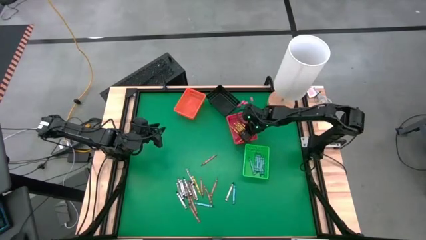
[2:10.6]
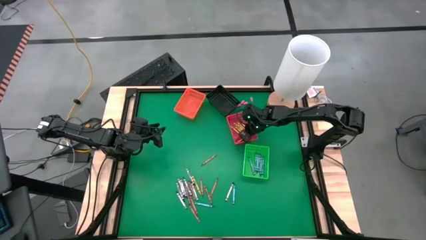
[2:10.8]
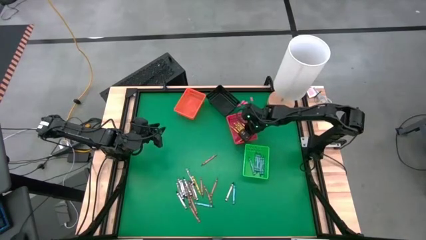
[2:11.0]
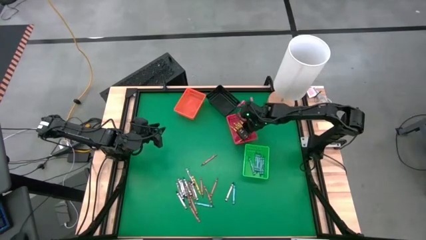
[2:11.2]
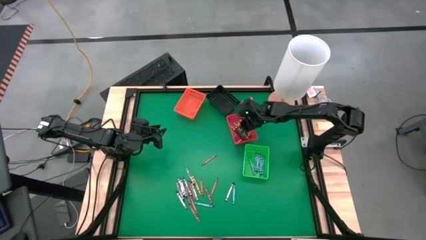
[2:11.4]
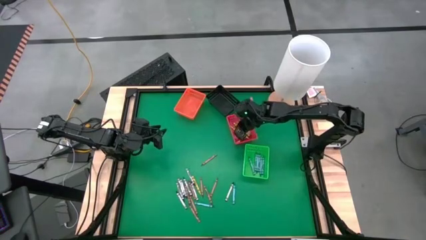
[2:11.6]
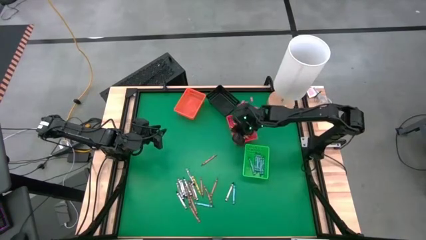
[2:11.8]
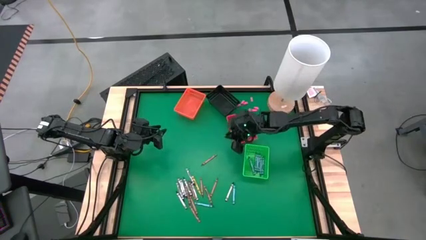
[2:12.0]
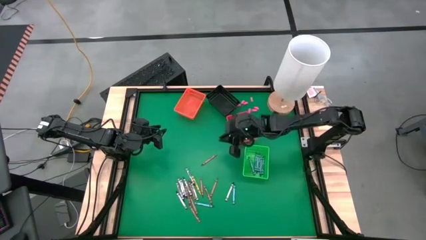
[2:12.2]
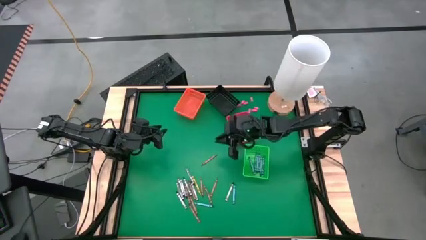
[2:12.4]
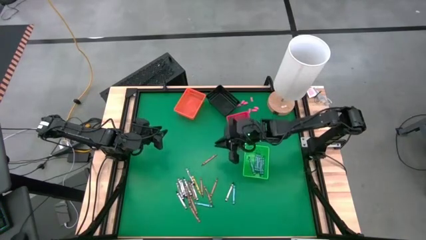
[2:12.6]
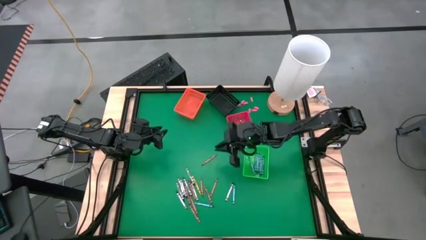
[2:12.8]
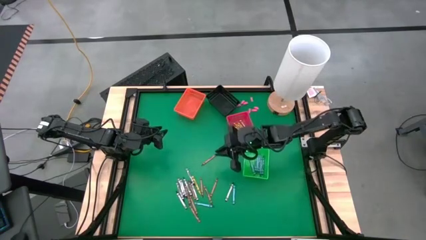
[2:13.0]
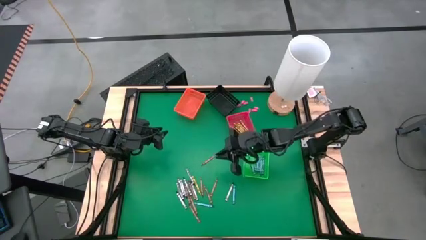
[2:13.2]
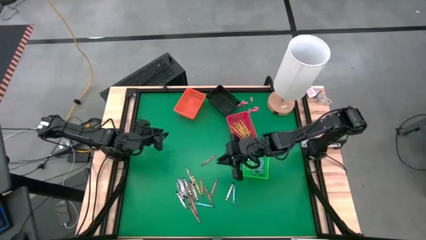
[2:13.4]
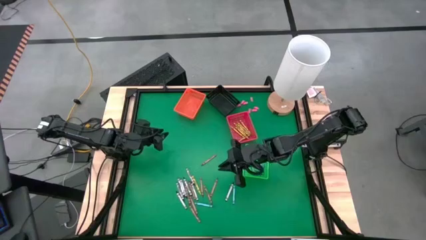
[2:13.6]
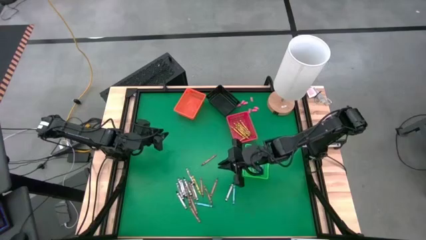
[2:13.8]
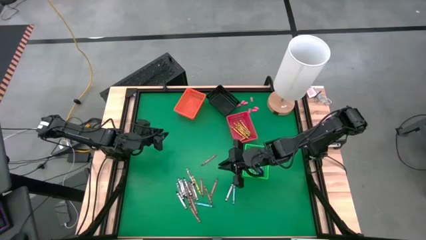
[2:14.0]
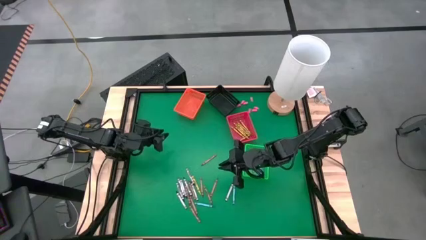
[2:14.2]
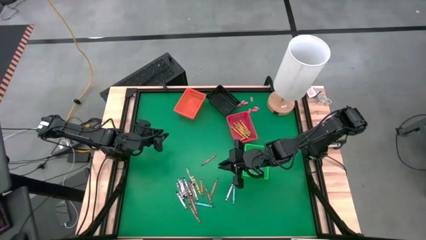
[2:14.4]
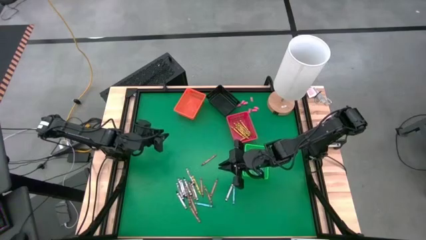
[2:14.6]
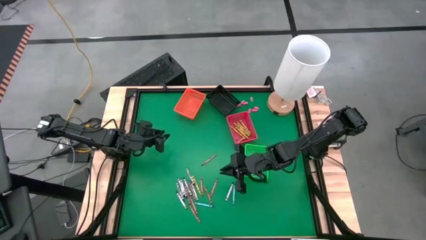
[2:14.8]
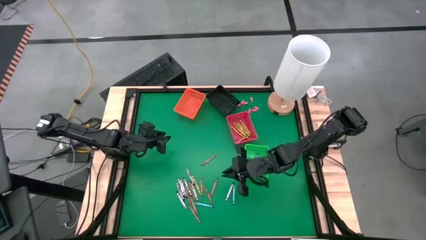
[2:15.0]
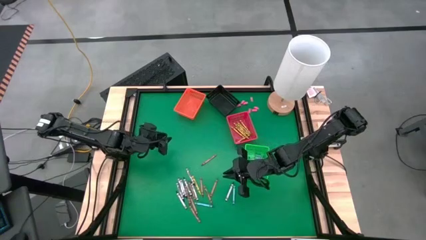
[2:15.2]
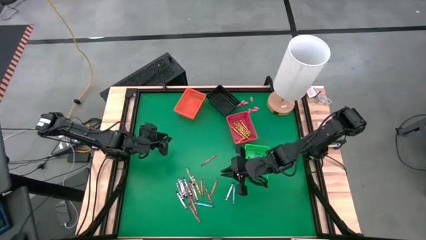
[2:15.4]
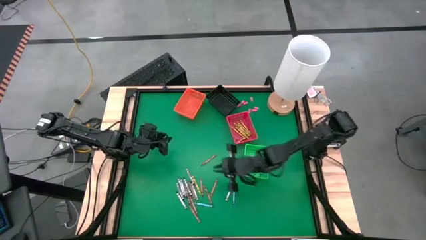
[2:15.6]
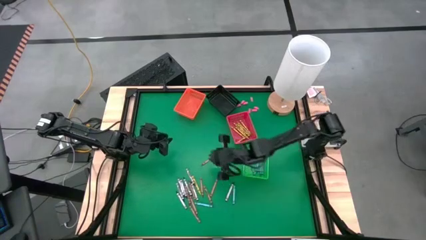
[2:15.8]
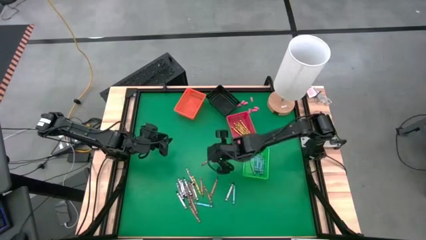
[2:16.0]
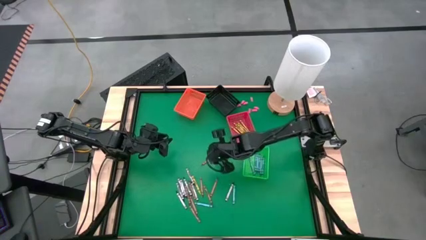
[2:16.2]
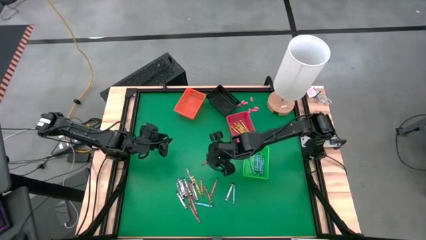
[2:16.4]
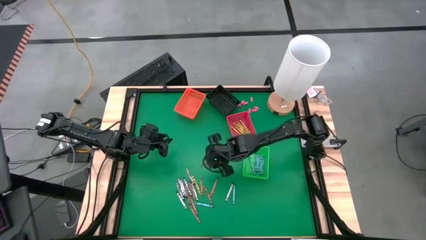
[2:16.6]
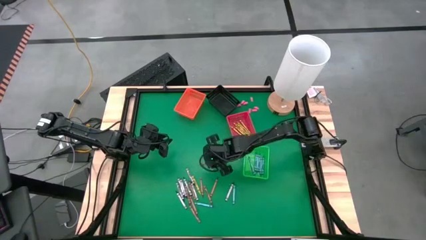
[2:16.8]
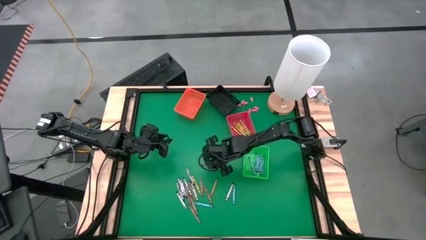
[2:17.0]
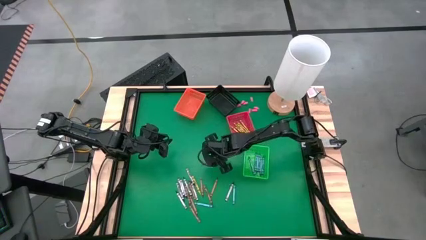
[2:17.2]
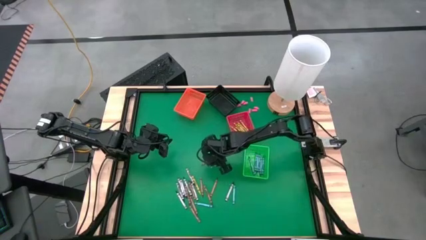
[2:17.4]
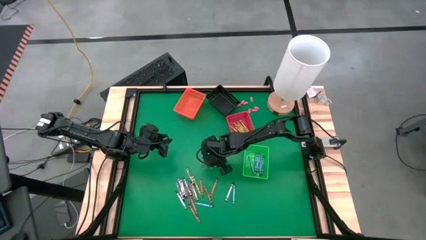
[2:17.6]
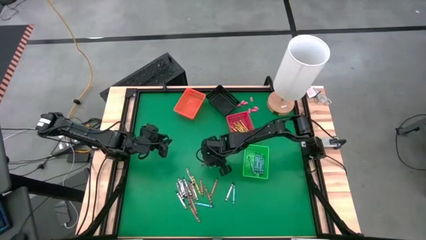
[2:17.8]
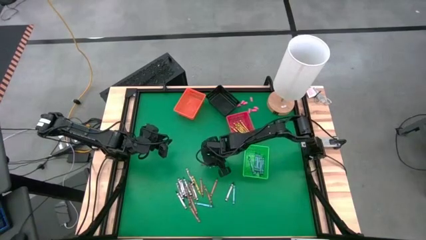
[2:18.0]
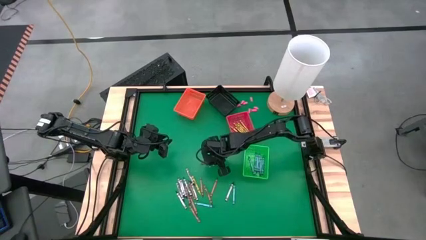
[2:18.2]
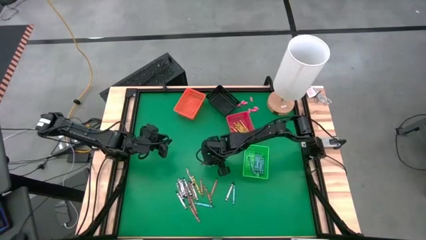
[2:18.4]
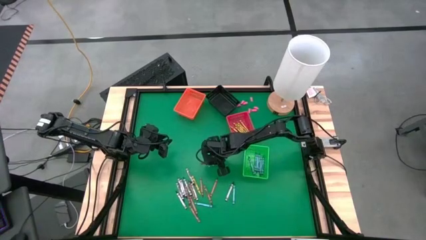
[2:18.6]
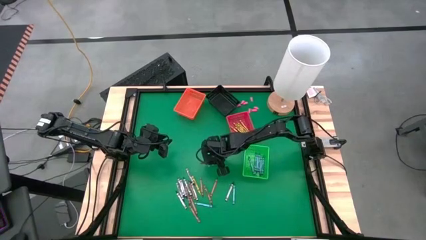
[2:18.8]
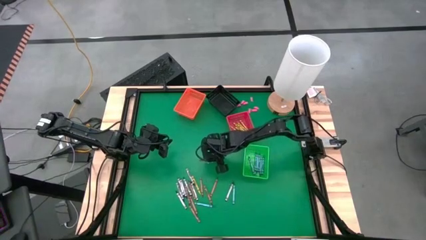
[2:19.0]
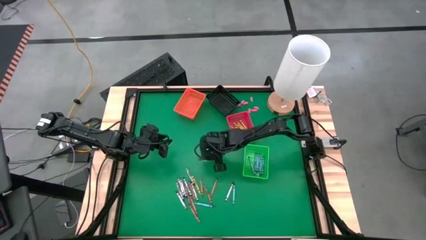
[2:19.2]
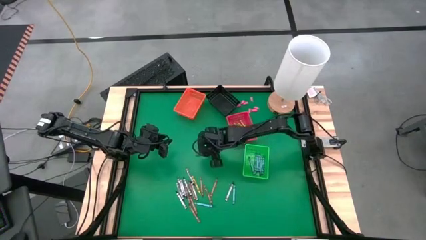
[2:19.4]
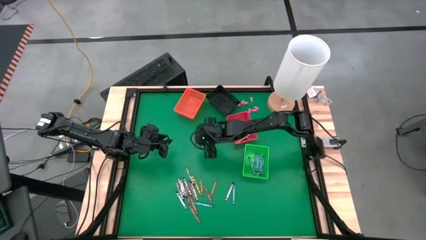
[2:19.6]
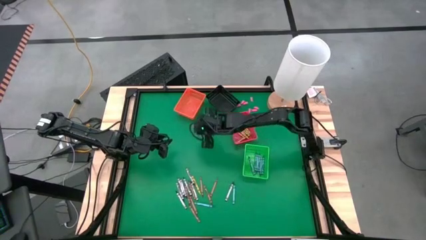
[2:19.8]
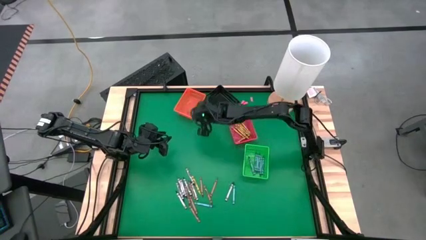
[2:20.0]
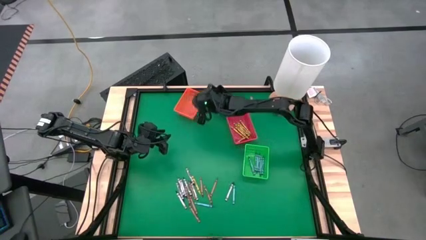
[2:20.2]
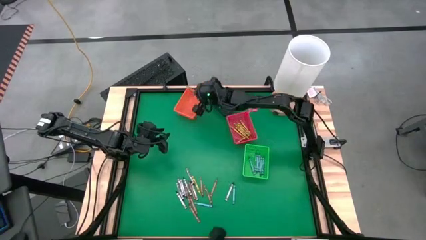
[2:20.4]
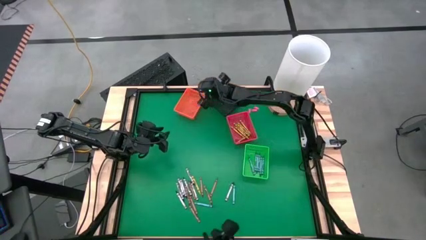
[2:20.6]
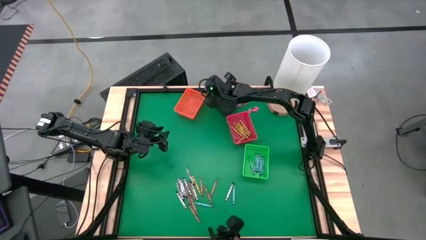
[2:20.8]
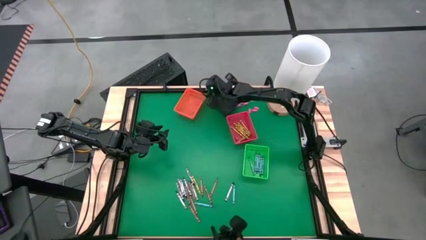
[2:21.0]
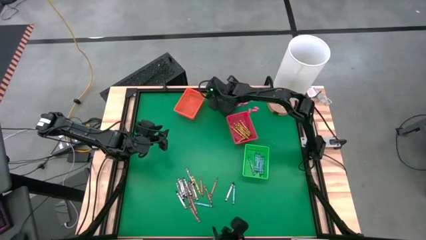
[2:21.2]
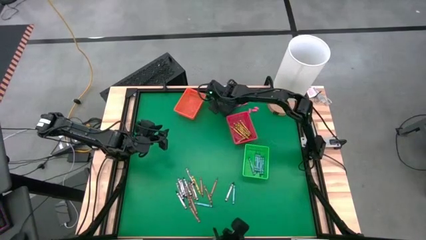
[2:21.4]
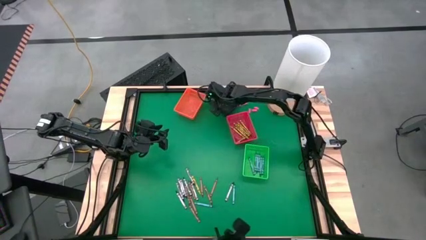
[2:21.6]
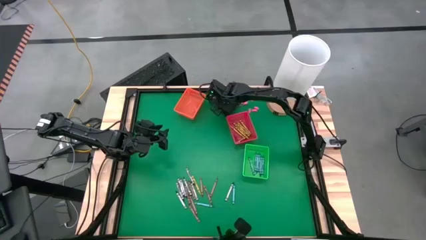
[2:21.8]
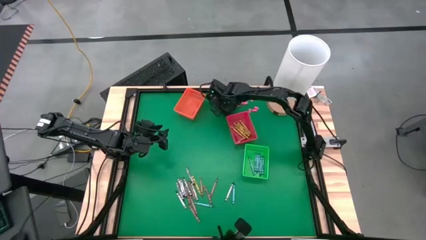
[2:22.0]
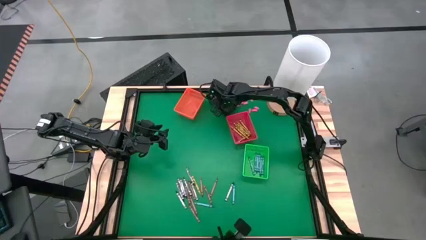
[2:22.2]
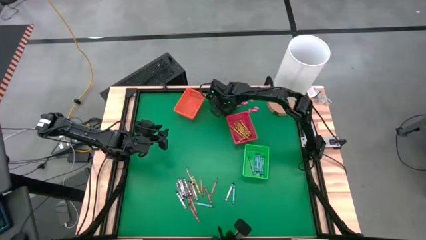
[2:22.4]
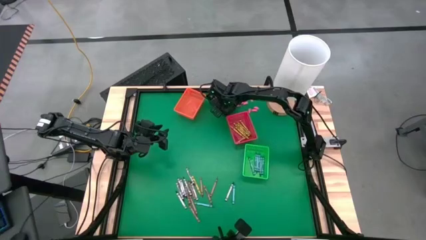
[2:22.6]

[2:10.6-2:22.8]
Task: Sort crayons
Put the brown crayon into the black bin
